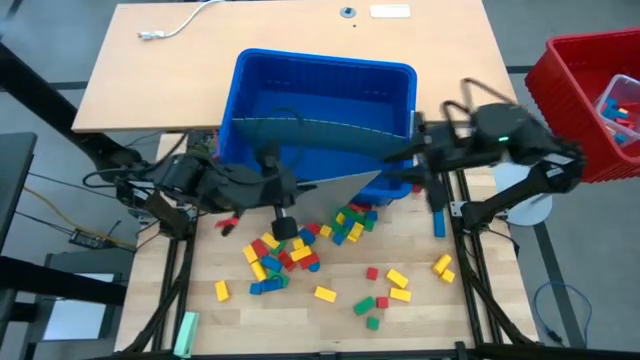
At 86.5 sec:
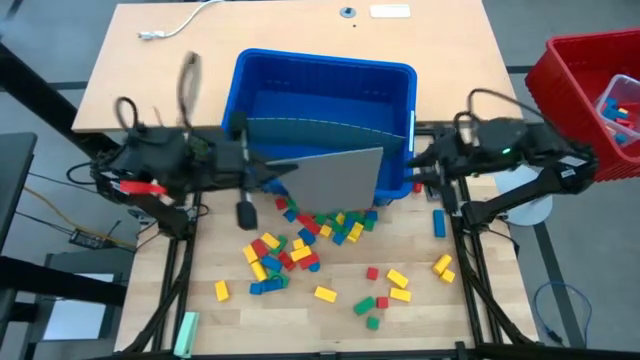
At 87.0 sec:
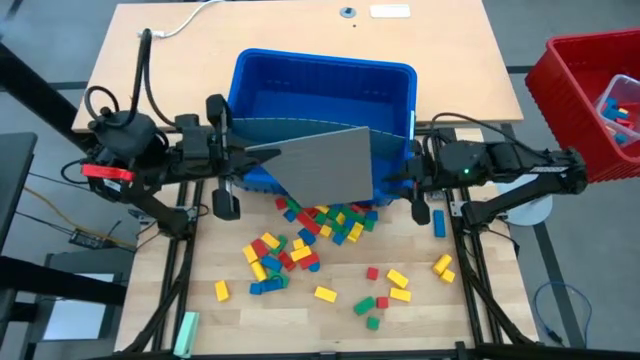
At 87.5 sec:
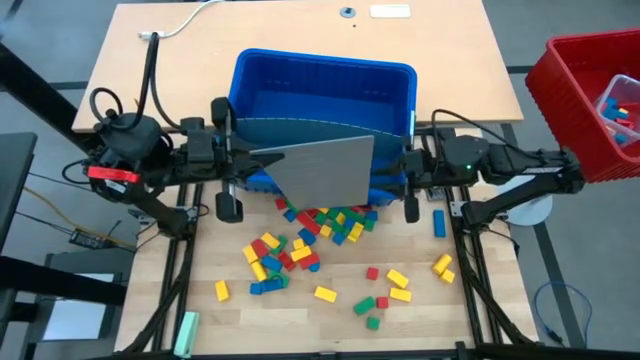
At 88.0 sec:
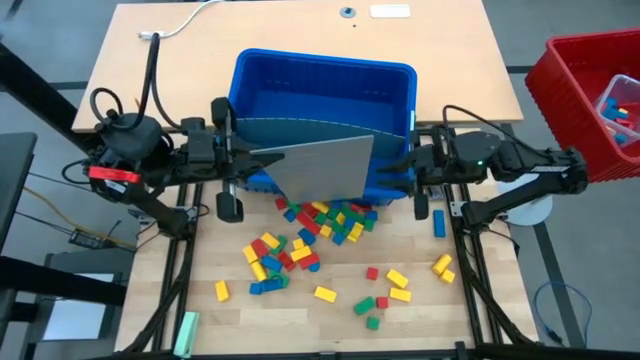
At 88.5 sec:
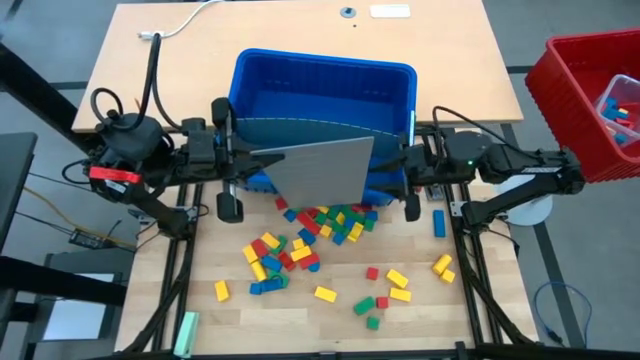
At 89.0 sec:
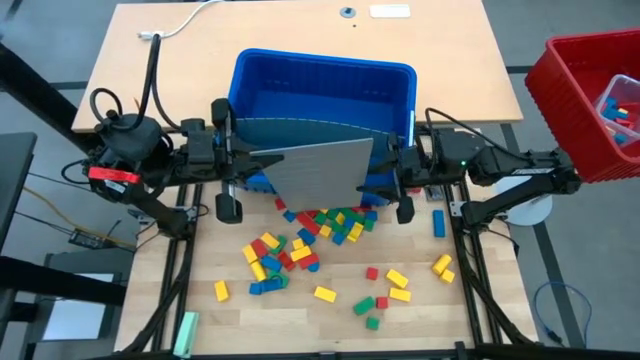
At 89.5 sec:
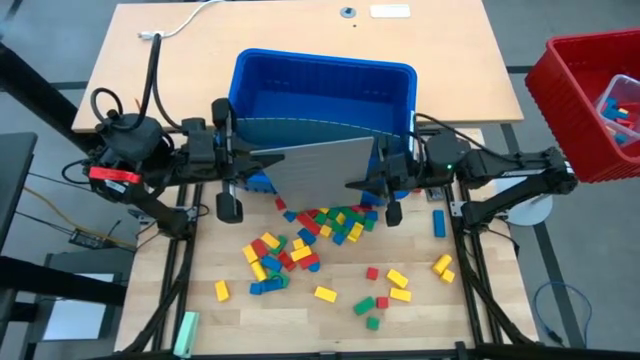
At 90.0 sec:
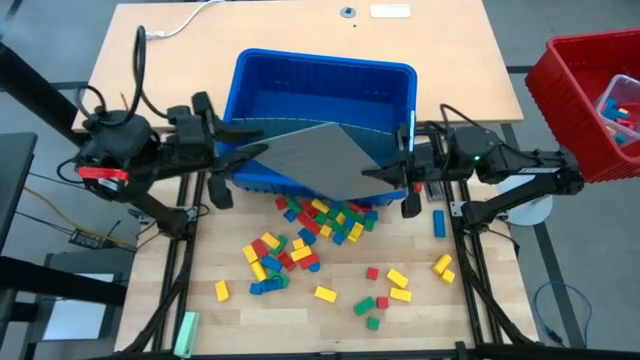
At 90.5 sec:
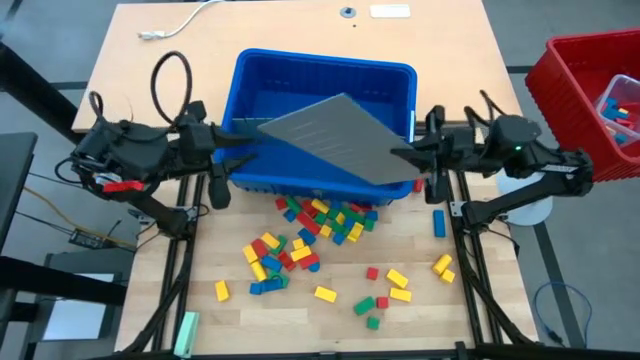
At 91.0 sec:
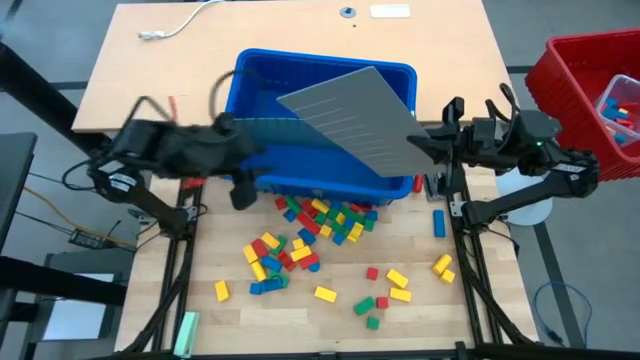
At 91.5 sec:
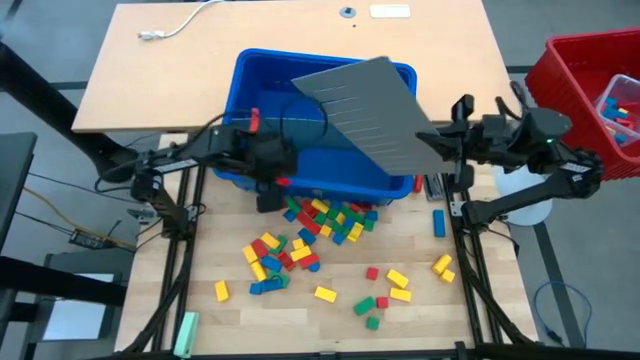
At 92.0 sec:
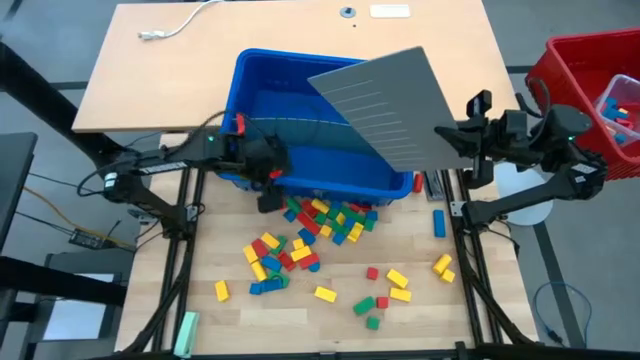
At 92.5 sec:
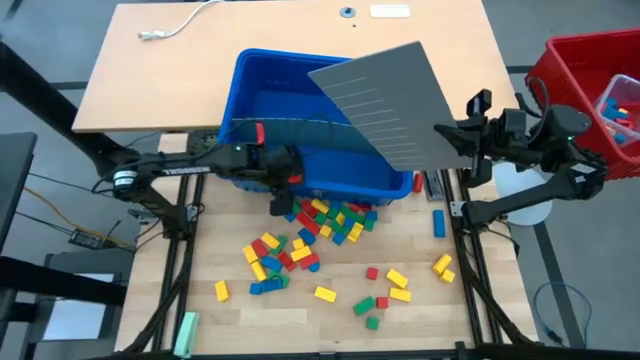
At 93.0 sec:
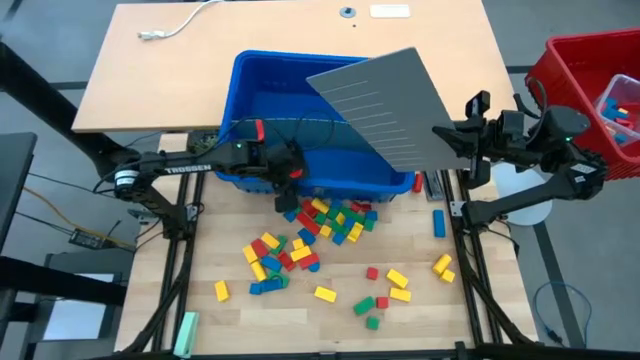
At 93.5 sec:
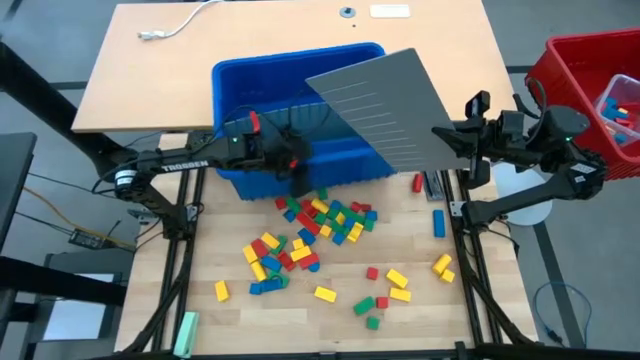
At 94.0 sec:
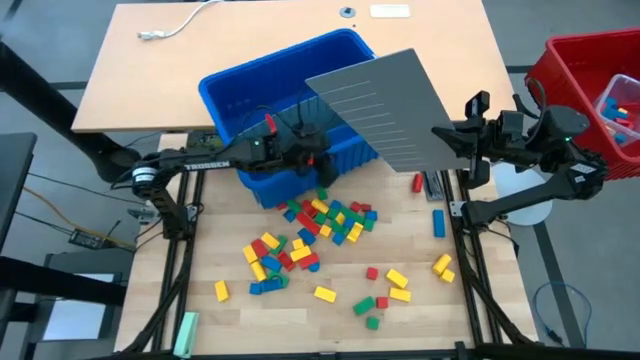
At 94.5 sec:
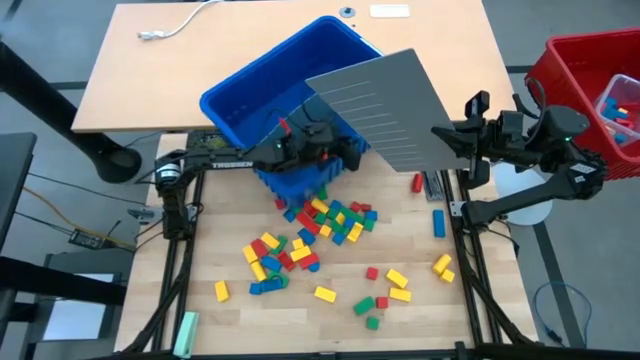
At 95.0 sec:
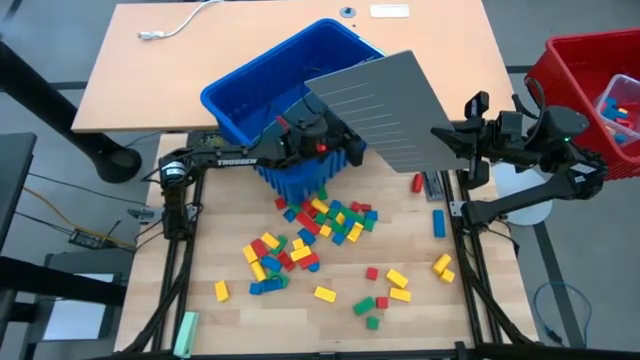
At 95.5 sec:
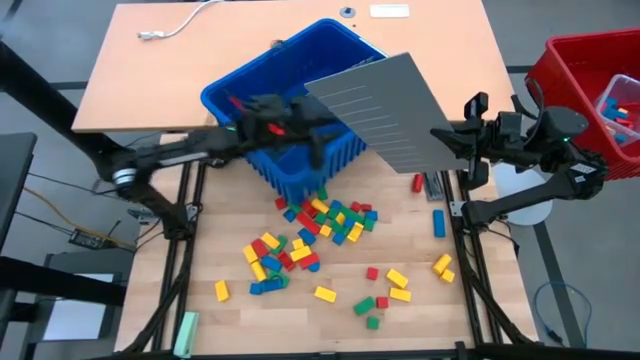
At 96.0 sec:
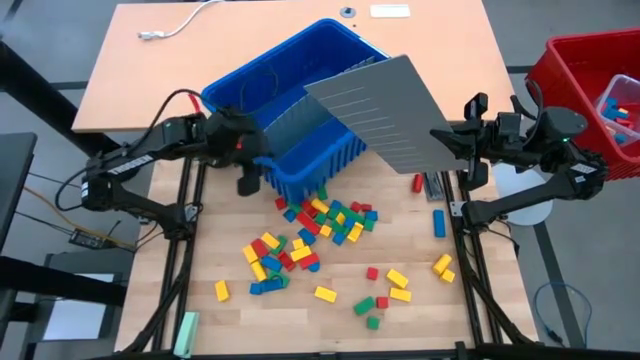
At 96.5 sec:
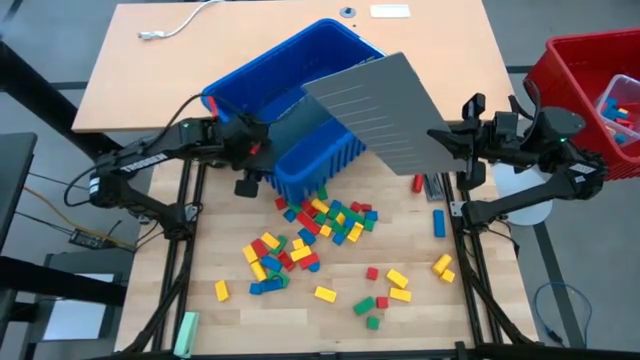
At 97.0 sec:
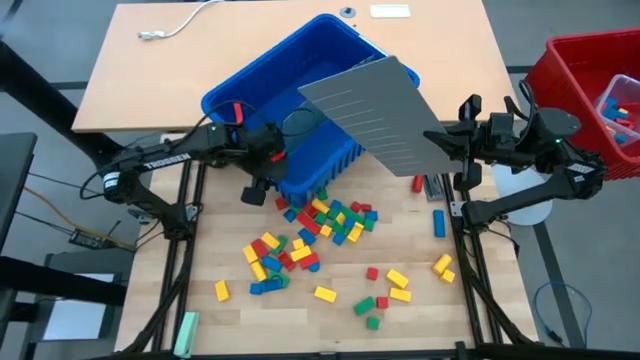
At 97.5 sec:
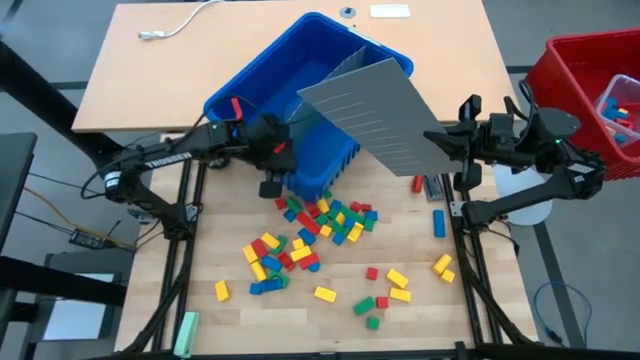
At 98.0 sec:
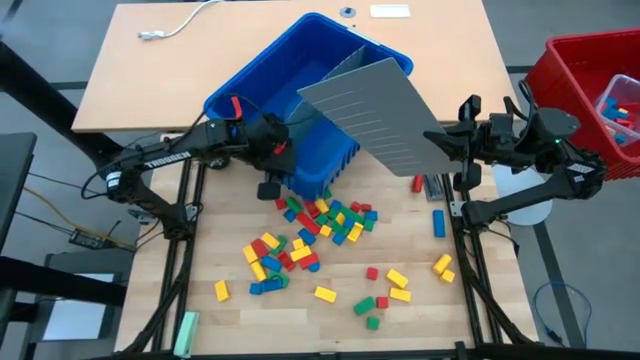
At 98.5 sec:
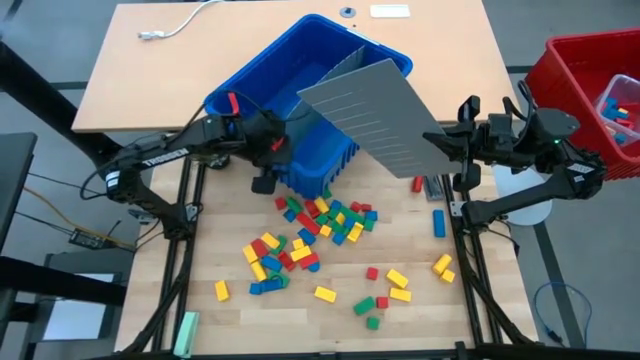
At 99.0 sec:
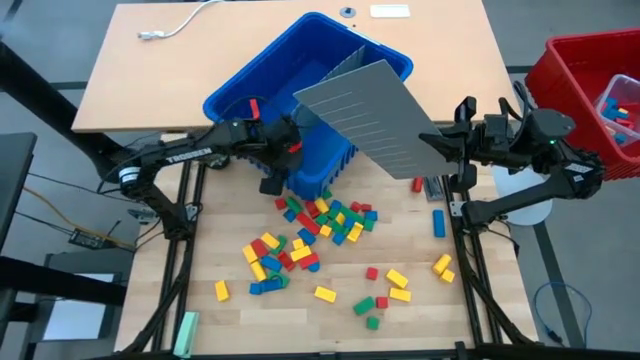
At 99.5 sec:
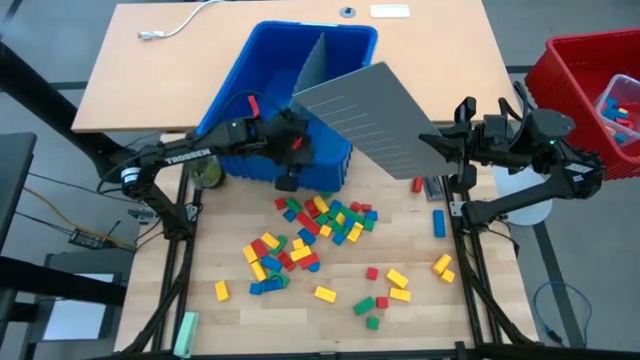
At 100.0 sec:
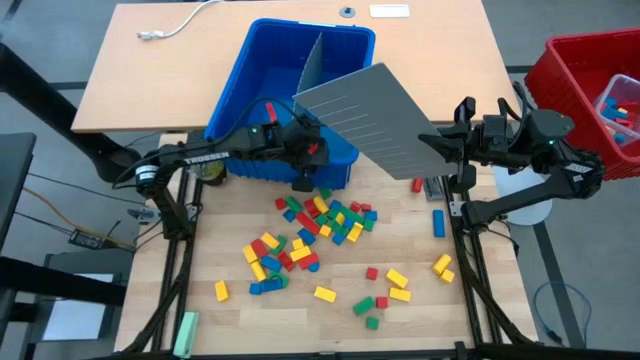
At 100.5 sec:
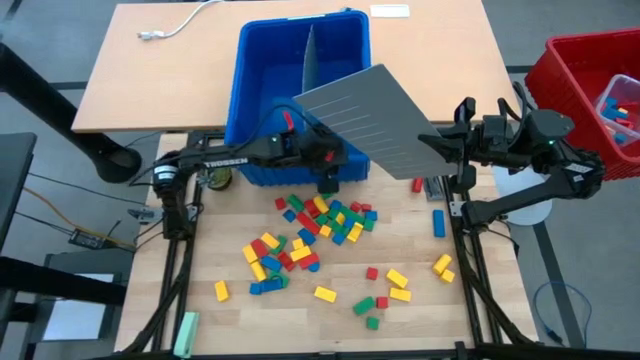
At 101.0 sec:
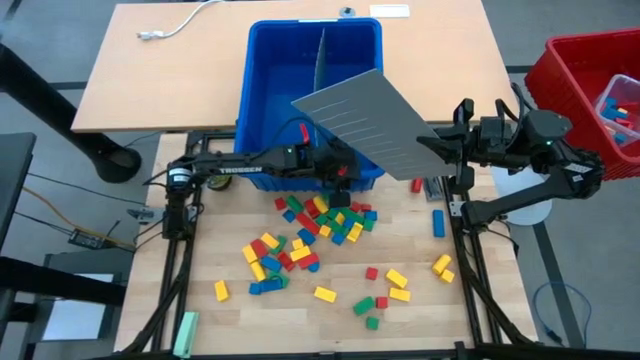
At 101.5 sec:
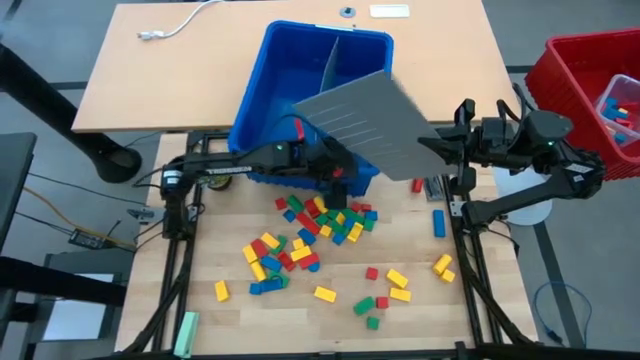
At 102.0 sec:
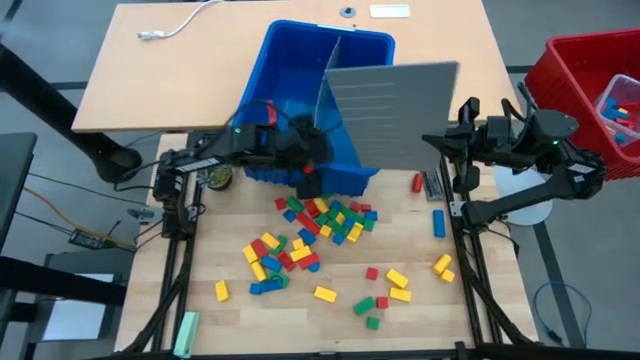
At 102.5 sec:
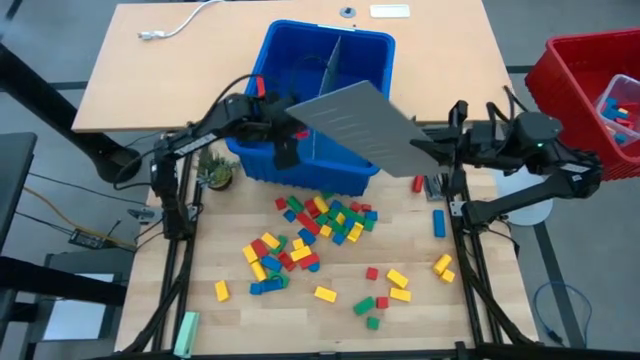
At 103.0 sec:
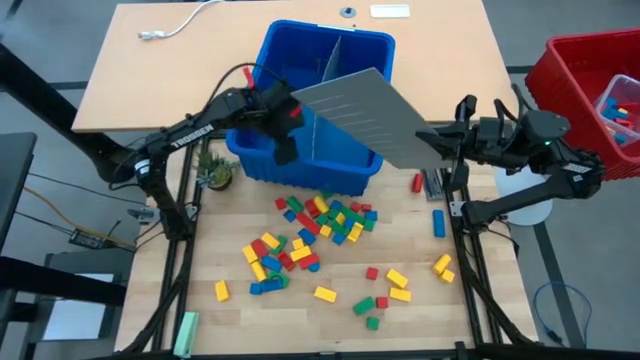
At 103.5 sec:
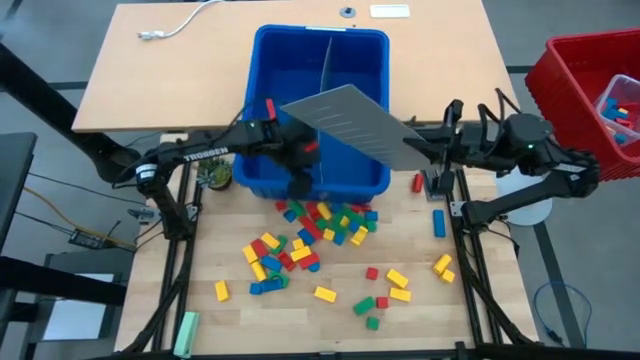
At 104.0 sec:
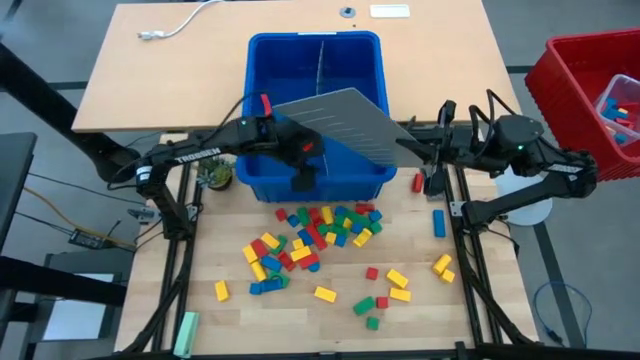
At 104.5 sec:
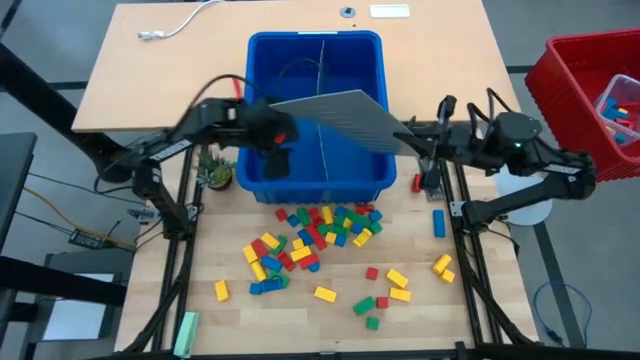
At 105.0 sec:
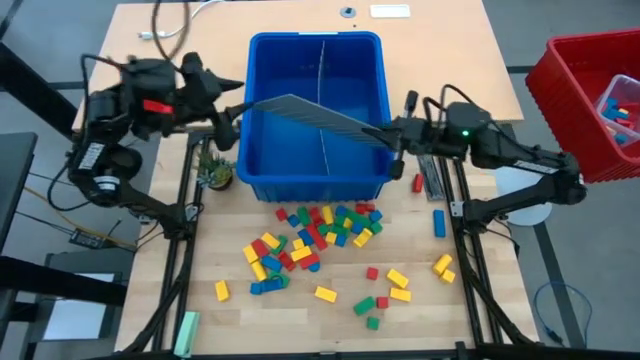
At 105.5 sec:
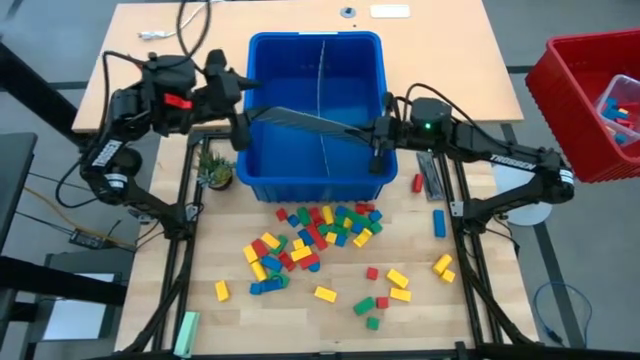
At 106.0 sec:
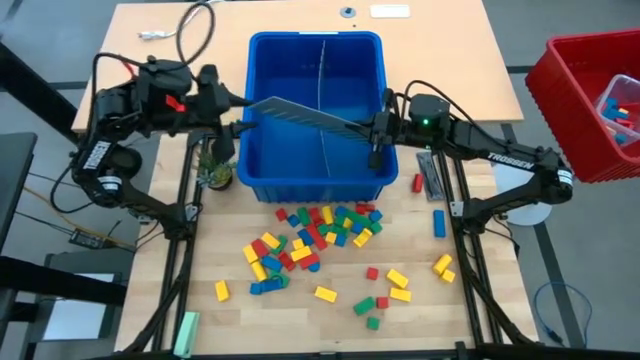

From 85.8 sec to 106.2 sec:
Task: Sort blocks
Assemble the blue bin using gray bin divider
